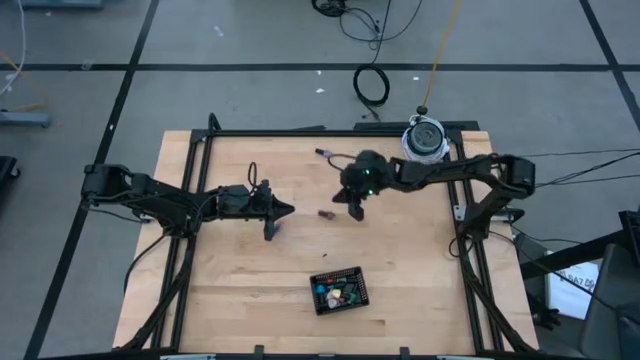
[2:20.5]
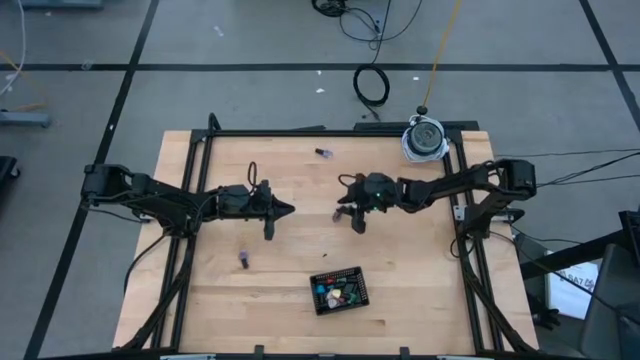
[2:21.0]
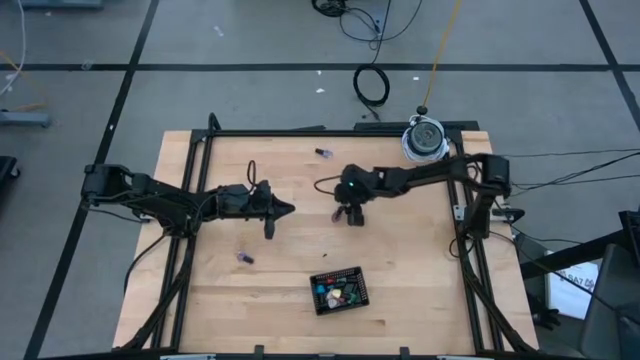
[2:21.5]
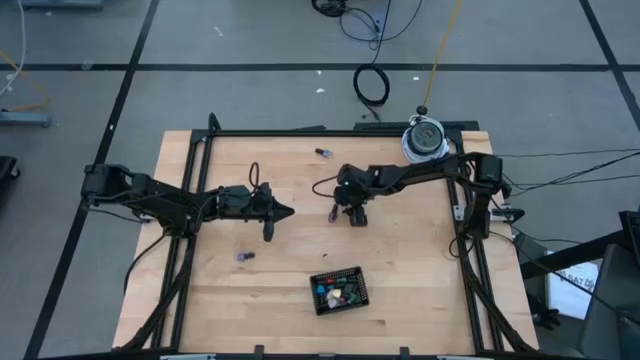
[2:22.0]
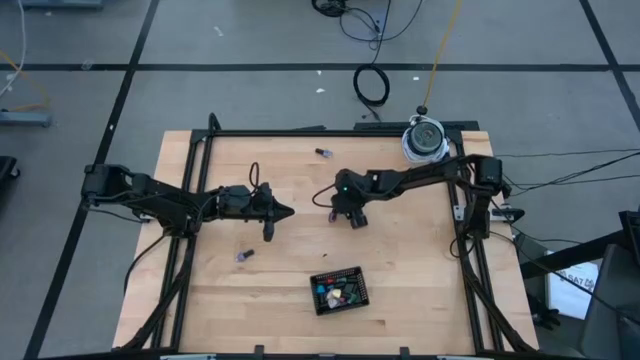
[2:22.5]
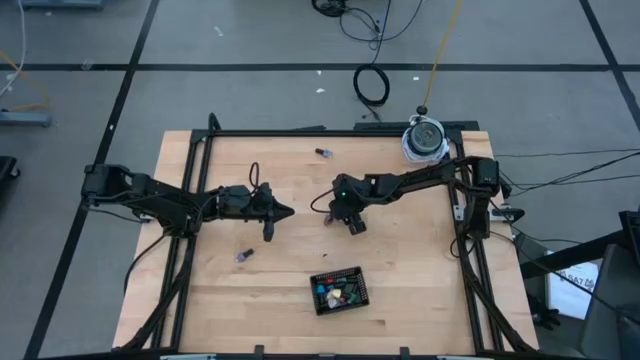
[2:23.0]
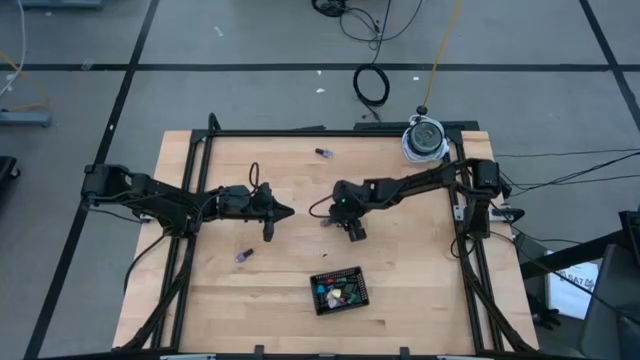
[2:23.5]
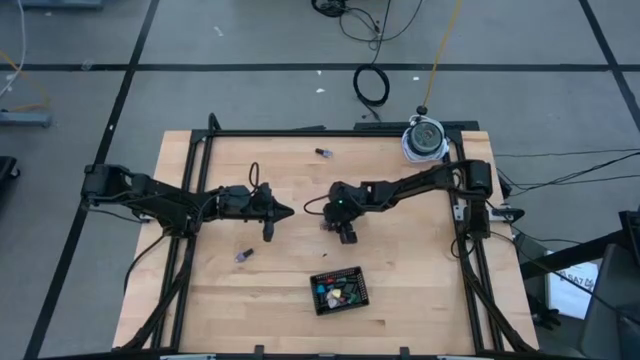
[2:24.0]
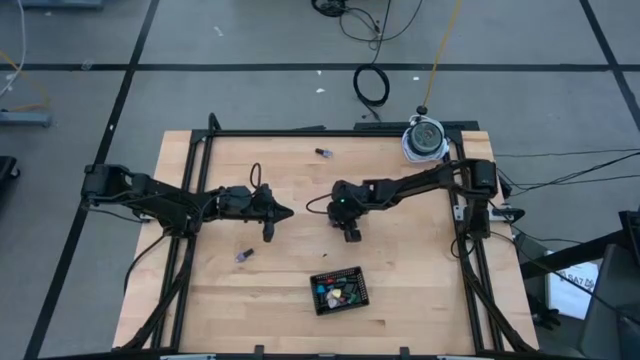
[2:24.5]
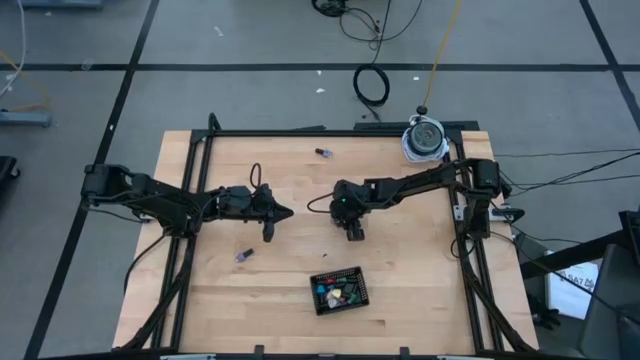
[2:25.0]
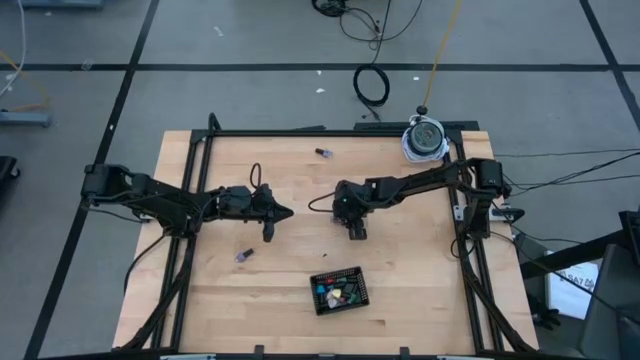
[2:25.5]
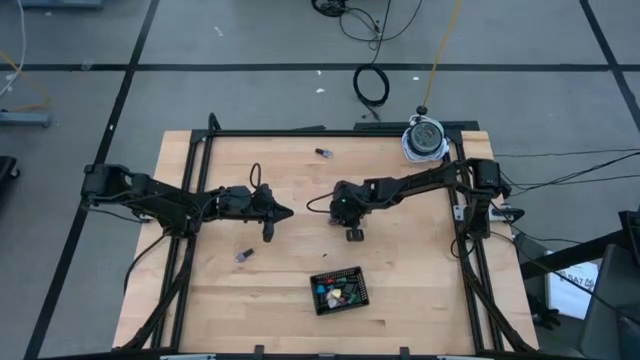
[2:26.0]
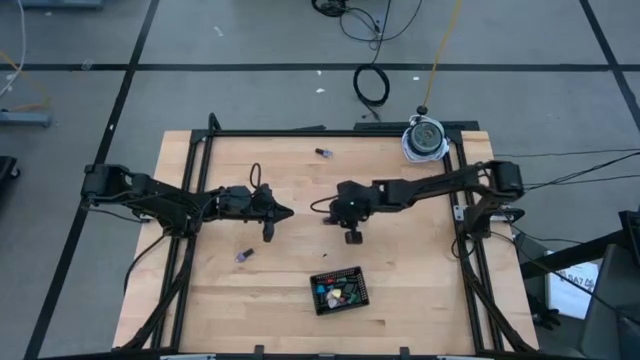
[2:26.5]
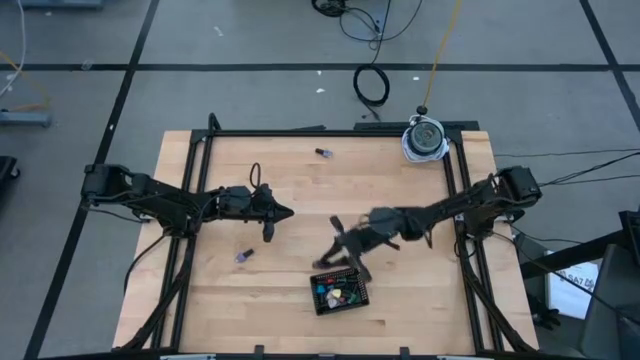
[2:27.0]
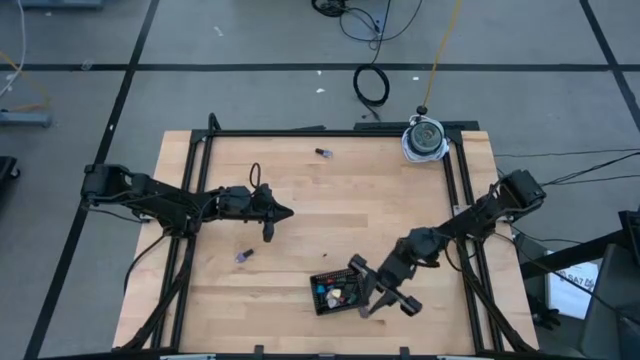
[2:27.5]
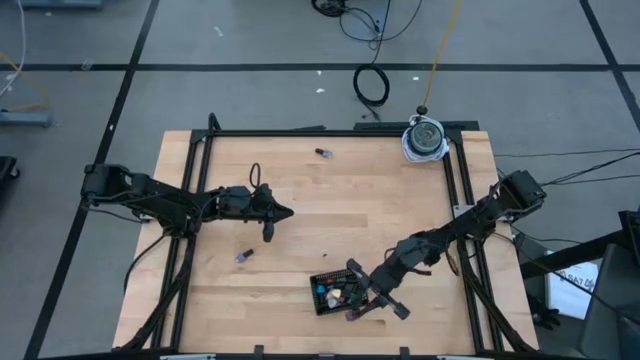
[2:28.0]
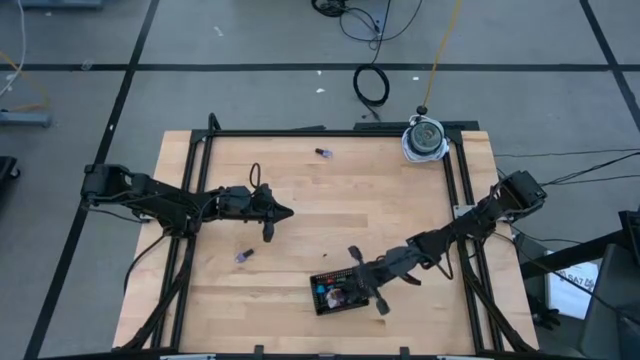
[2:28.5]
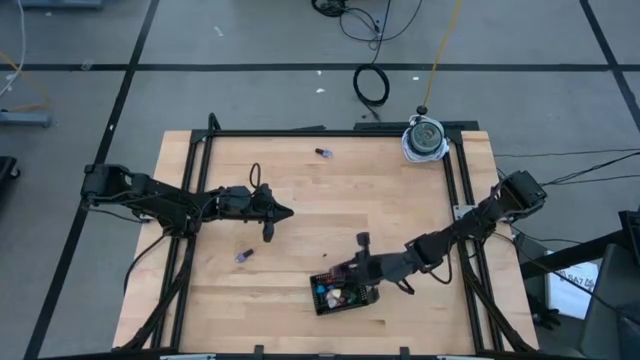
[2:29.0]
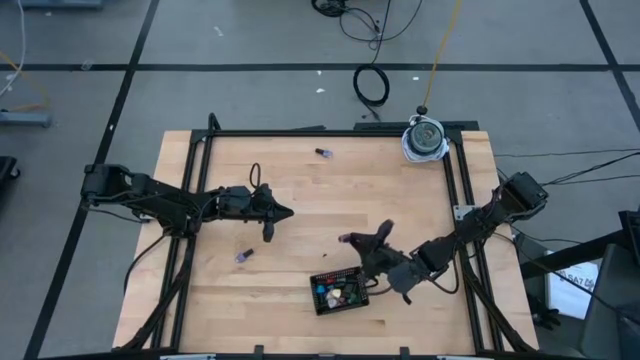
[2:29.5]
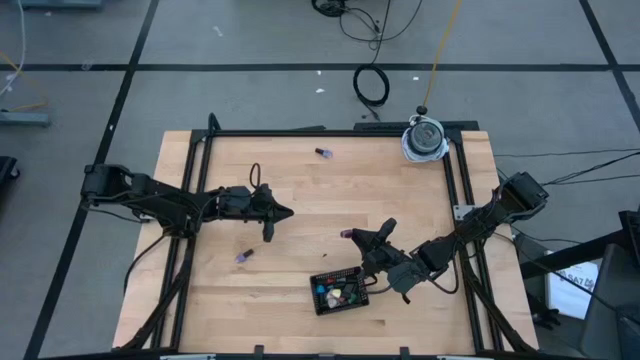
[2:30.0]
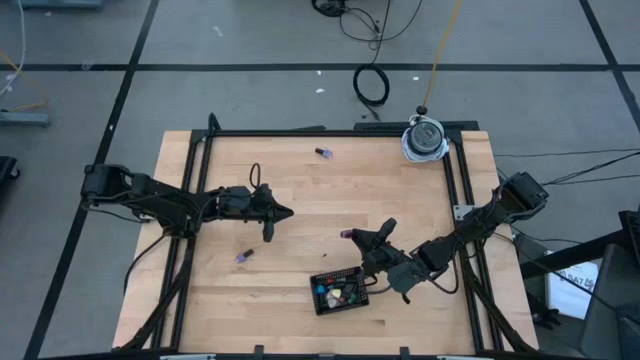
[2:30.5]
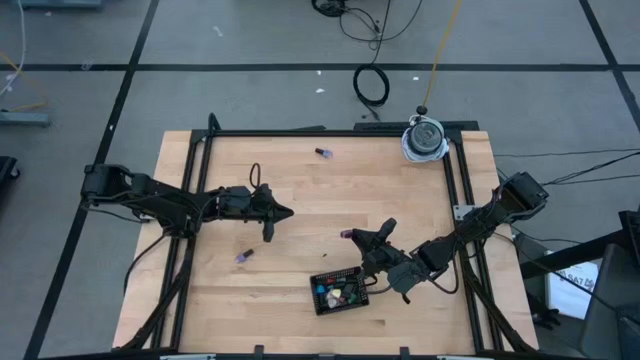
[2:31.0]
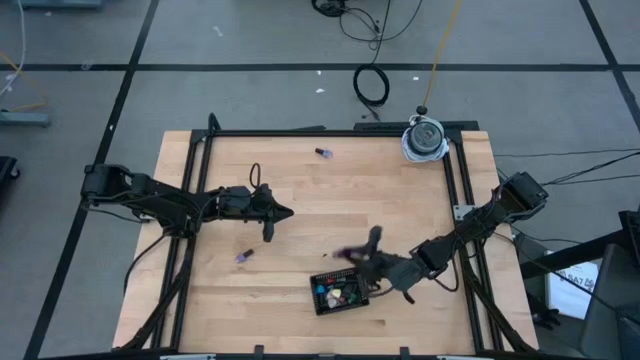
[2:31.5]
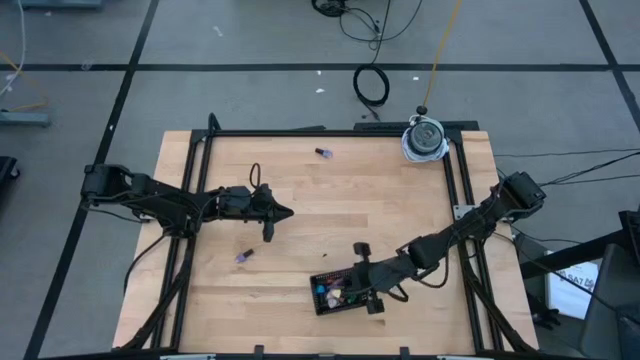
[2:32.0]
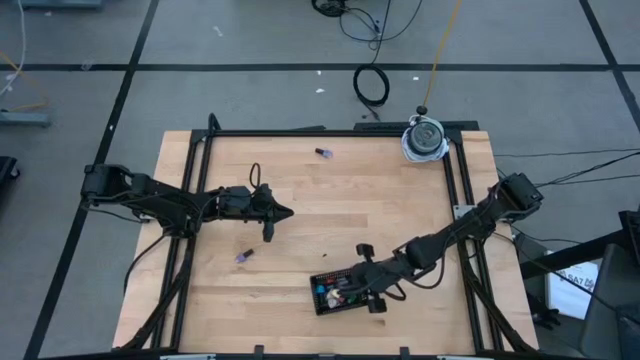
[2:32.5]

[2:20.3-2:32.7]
Task: Pick & Place Nail Polish
Put the violet nail polish bottle into the black bin

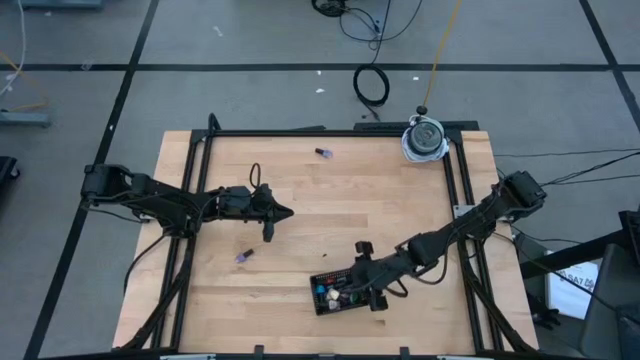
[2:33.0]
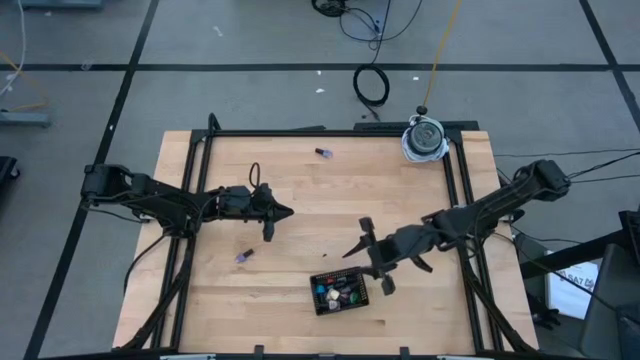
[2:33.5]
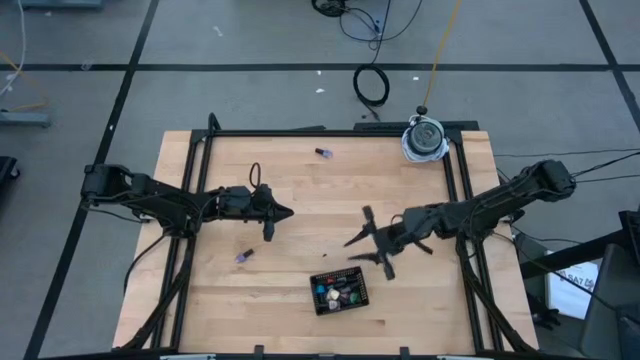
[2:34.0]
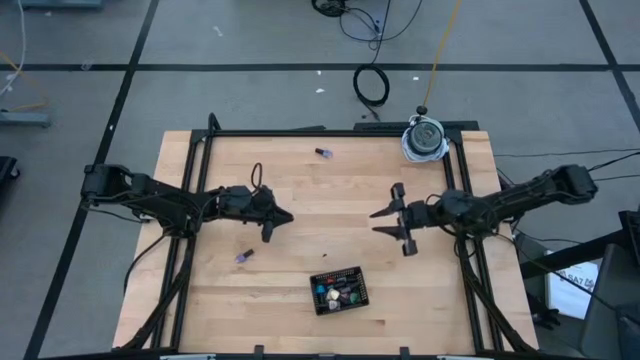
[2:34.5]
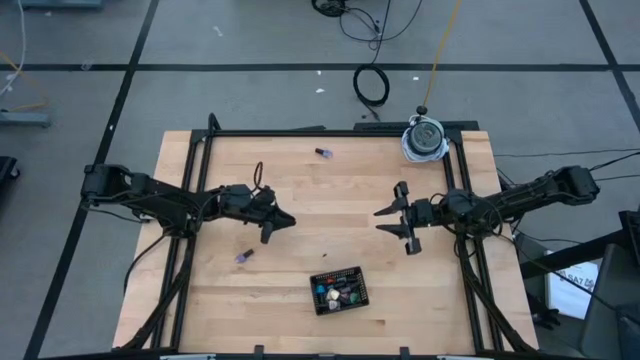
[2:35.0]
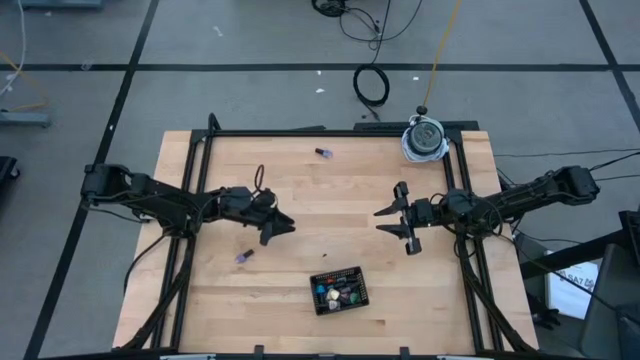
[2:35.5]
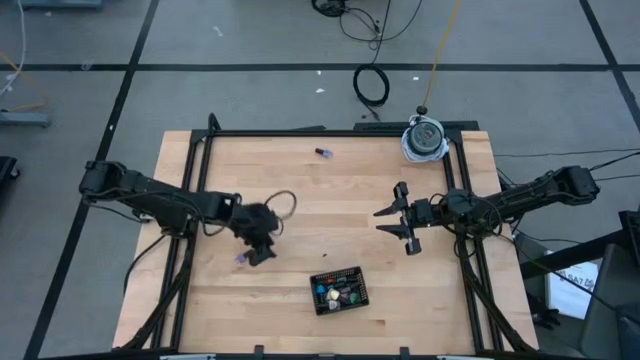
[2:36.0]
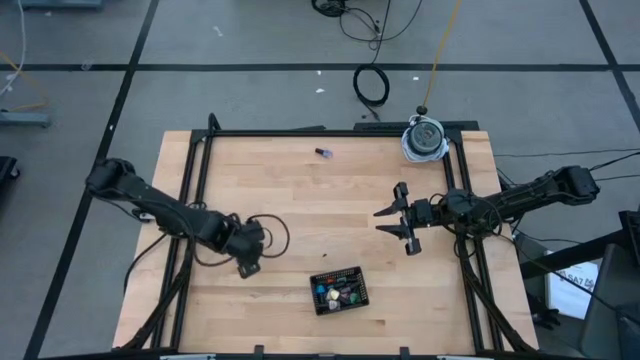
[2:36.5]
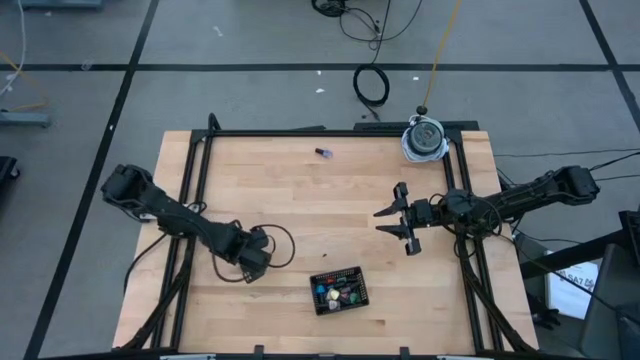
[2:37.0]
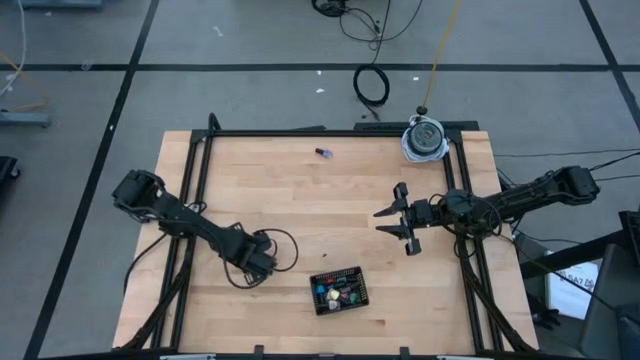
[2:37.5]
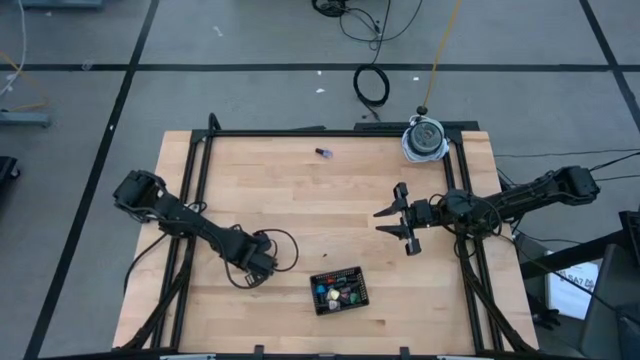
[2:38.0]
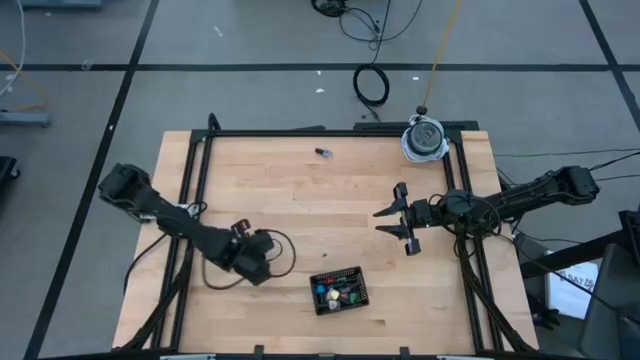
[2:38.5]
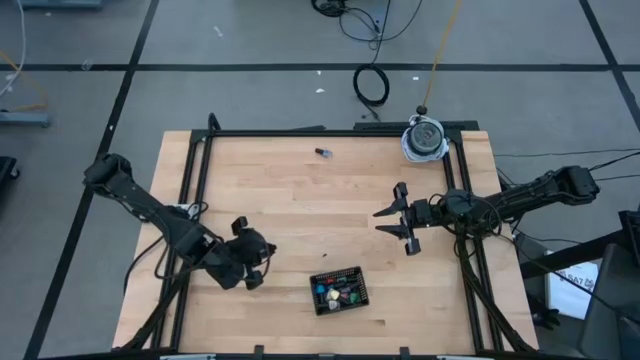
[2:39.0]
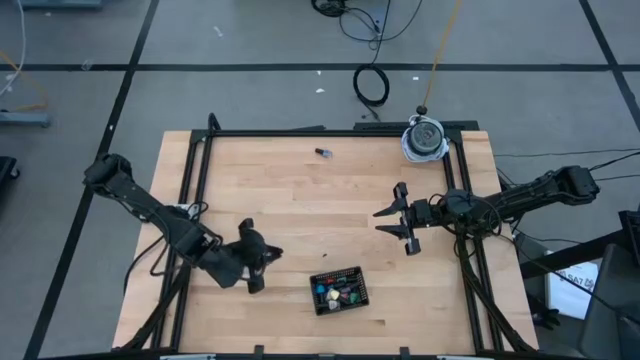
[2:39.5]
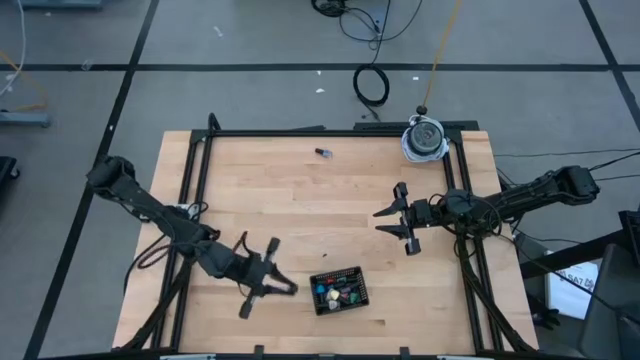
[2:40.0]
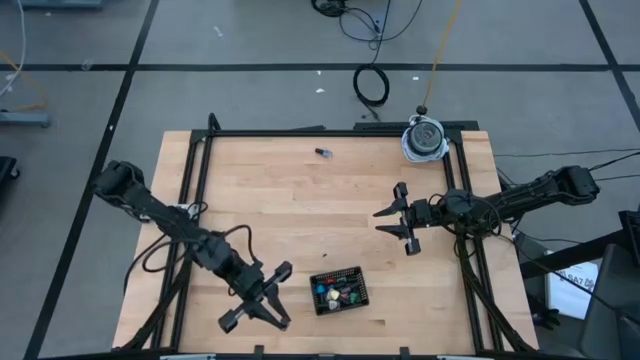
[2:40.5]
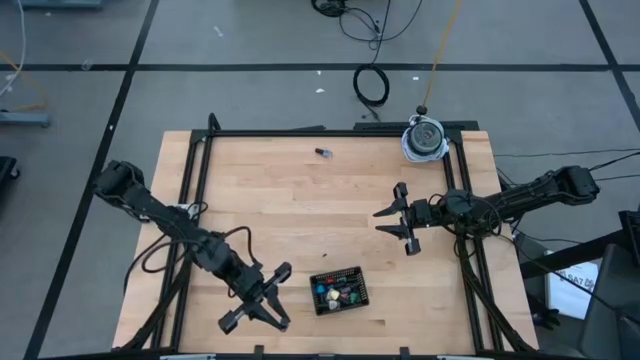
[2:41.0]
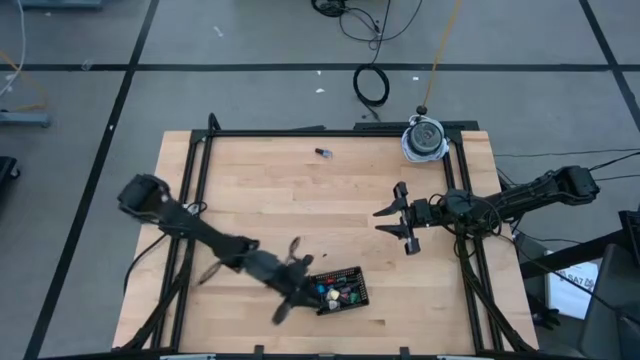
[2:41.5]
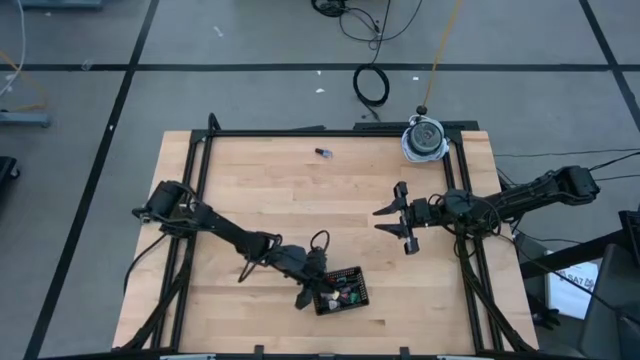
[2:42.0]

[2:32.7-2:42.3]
Put the purple nail polish bottle into the black bin
